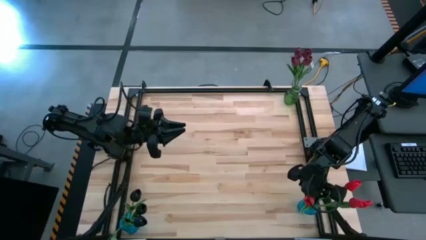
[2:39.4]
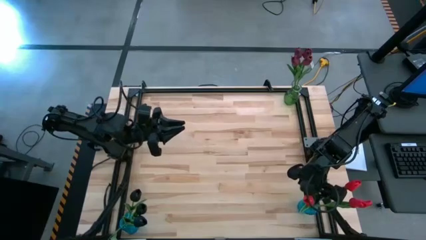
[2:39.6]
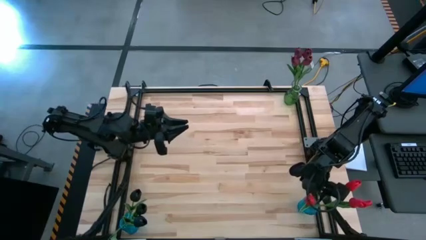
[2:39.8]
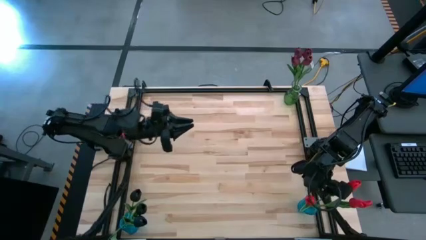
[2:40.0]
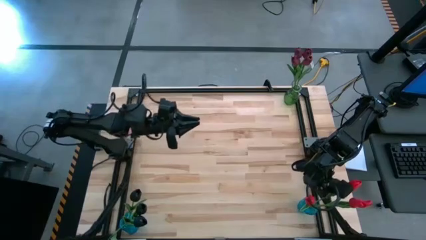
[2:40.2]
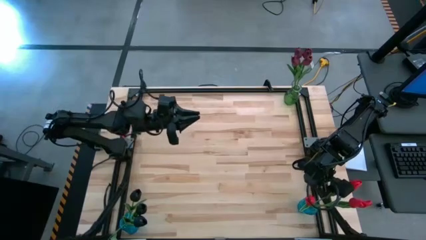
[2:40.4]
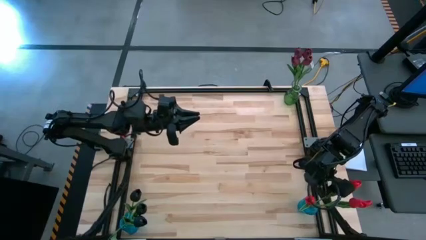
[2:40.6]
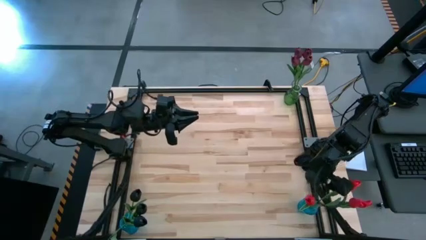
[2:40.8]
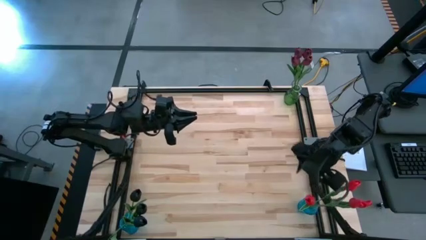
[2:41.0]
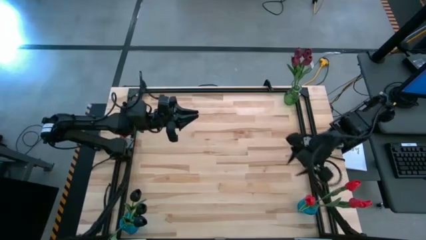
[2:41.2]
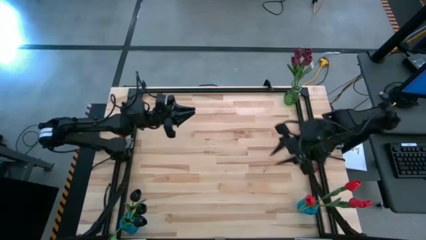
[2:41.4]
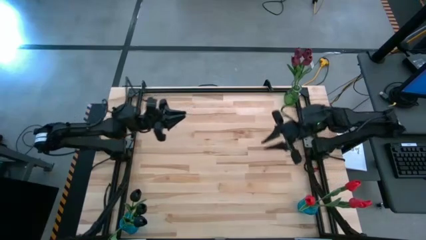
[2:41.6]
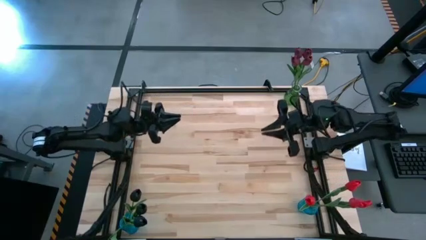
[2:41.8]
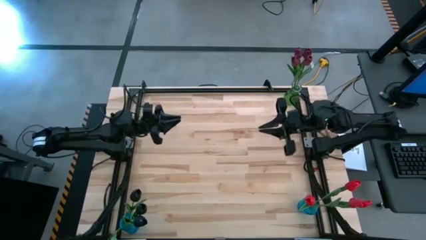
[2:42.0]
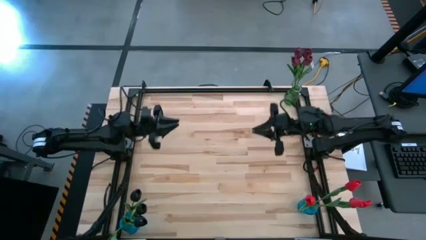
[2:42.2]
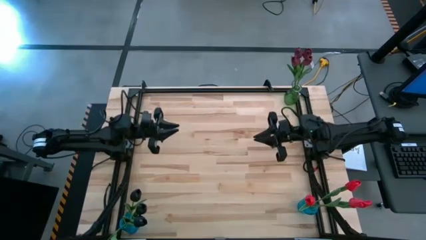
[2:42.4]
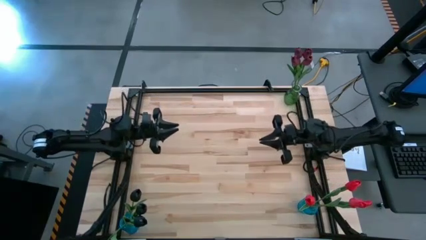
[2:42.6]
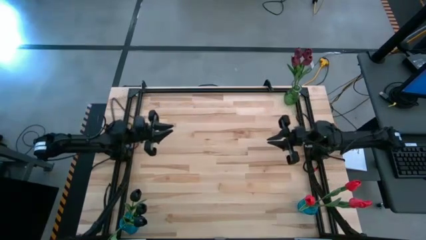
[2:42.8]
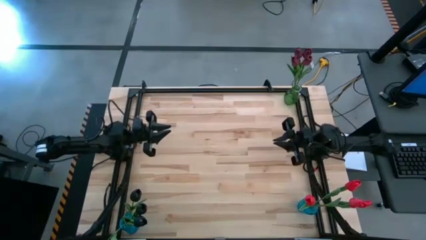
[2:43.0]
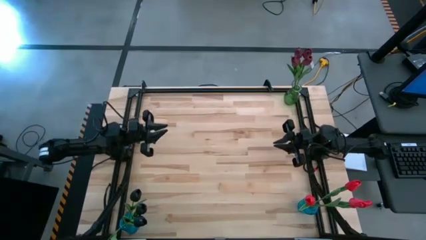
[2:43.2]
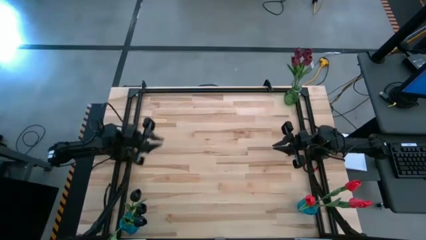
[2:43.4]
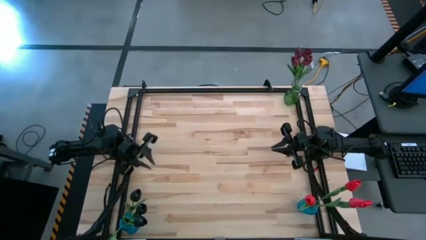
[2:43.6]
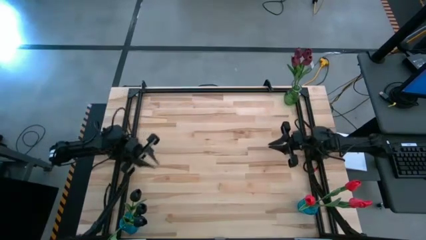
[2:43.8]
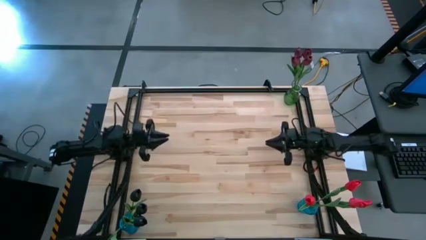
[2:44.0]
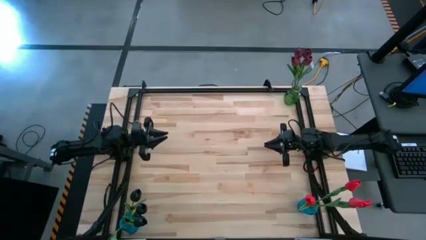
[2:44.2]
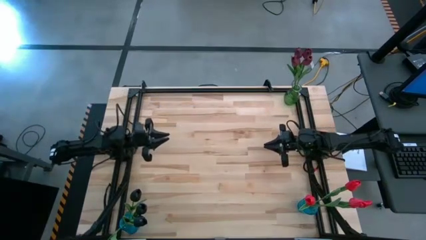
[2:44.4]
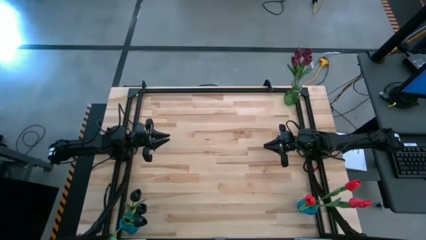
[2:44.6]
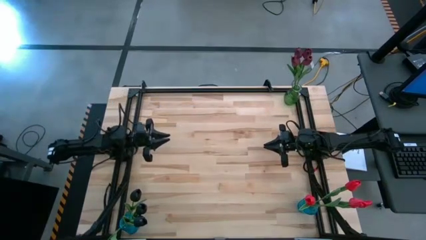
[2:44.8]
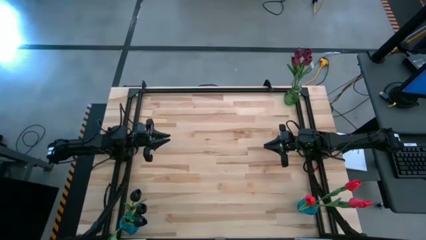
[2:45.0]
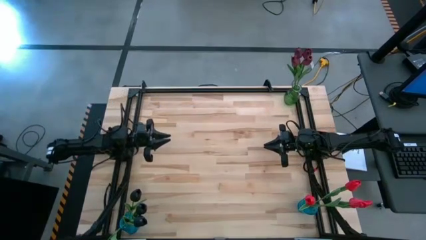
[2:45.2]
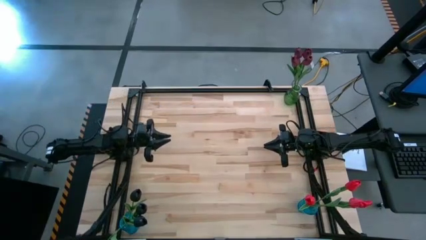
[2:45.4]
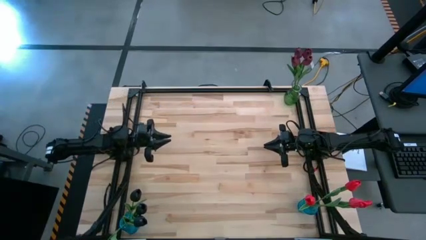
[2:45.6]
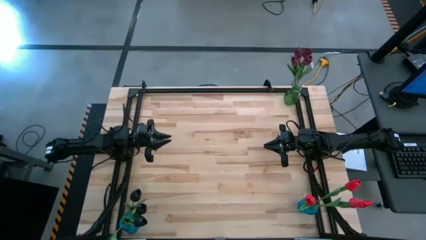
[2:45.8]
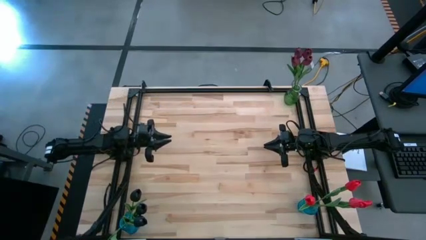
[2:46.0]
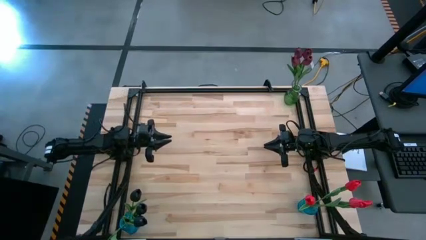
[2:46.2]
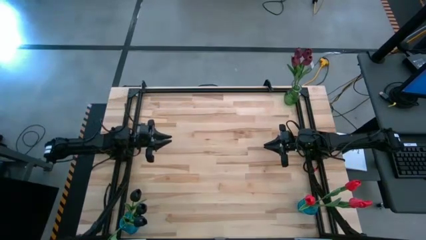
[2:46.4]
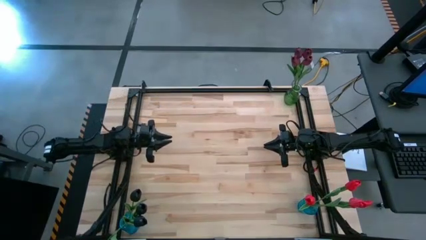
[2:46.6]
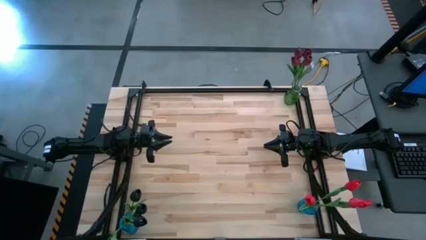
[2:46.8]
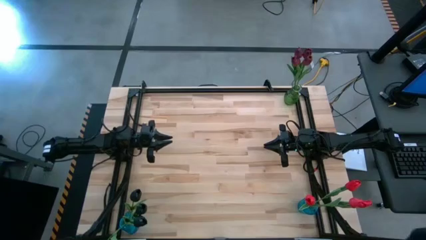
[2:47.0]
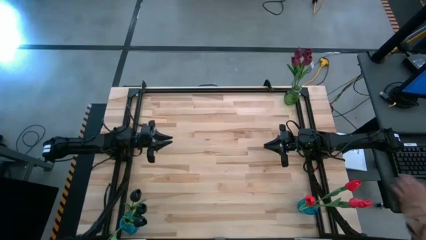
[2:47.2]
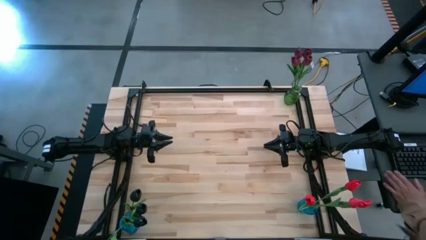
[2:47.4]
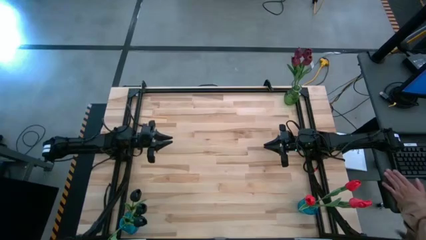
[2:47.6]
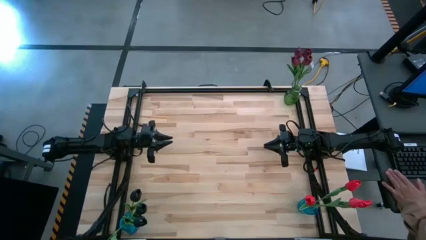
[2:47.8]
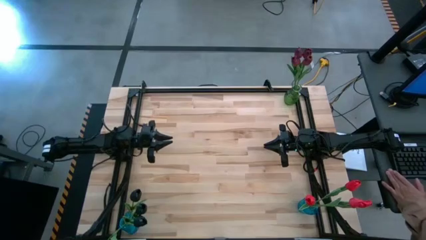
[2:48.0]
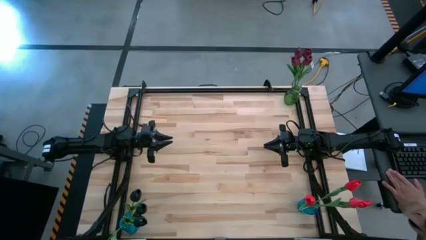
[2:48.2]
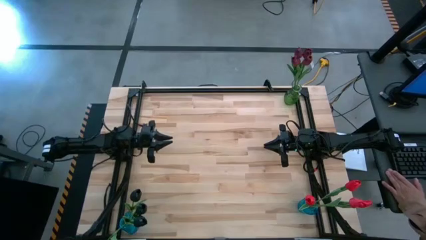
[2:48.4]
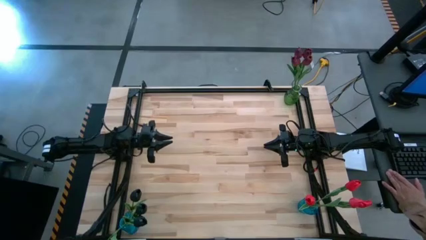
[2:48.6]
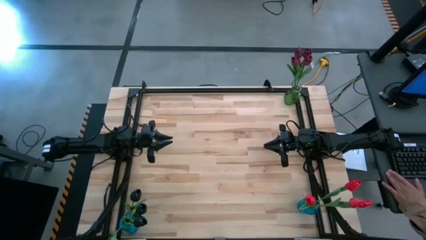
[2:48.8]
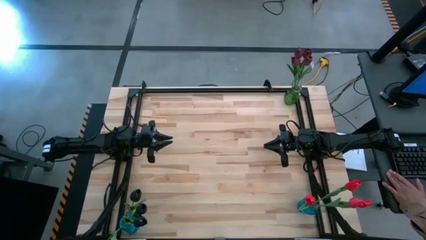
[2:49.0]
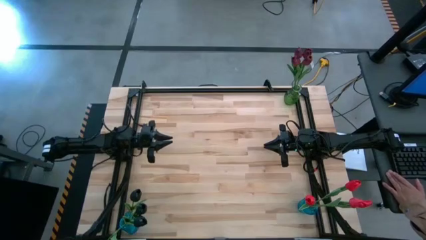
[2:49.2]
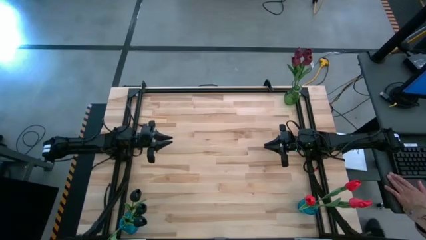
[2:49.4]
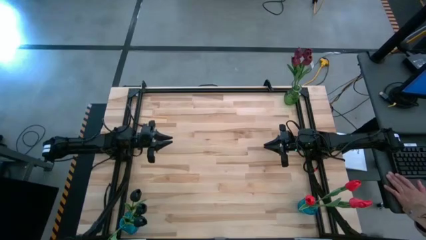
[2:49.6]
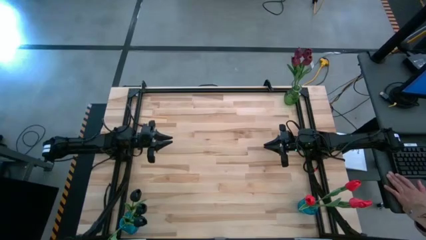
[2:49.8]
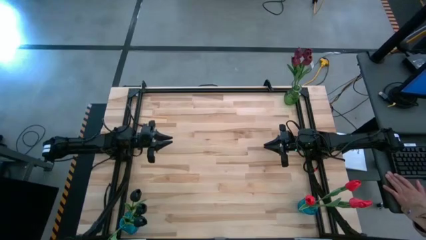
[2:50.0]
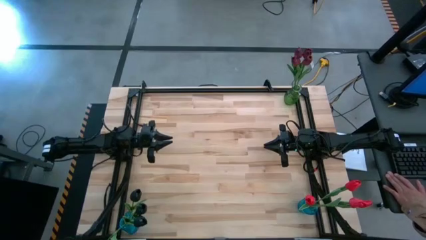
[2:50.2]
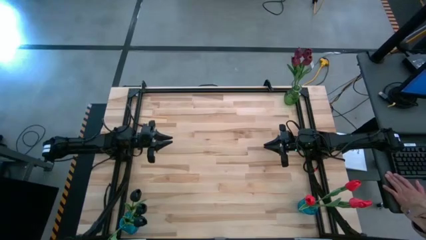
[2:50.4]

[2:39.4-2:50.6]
Task: Sort flowers into vase by color
Return to Home Position

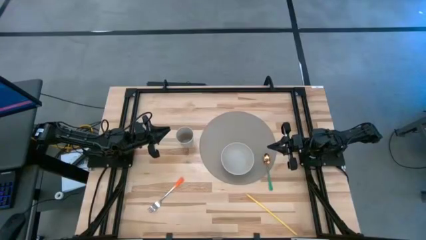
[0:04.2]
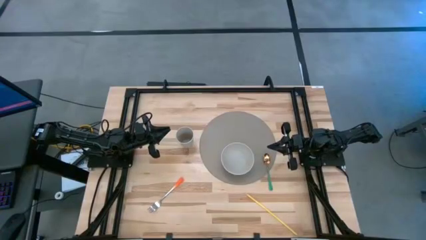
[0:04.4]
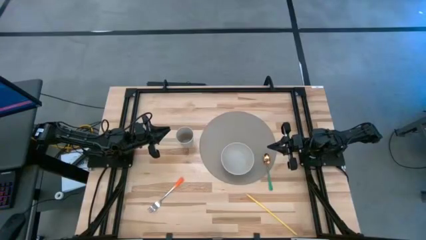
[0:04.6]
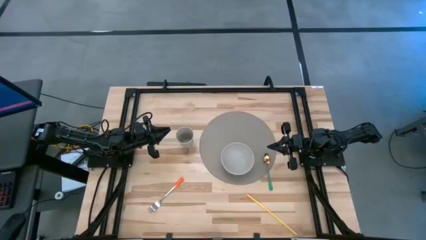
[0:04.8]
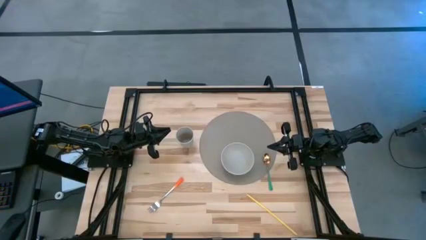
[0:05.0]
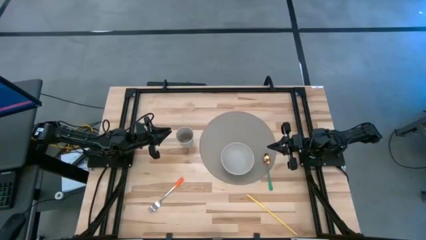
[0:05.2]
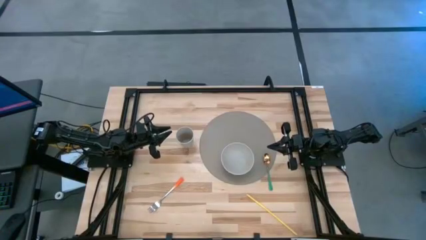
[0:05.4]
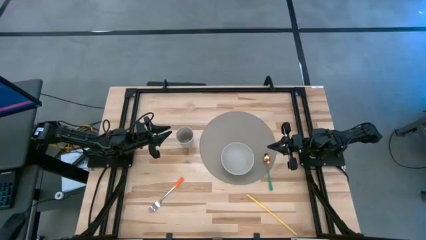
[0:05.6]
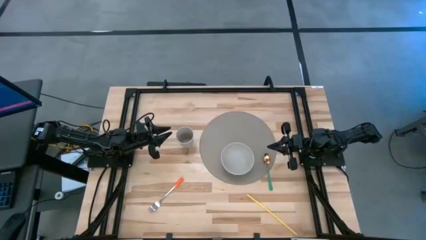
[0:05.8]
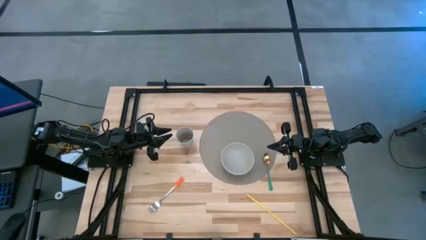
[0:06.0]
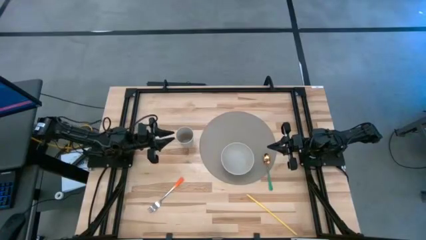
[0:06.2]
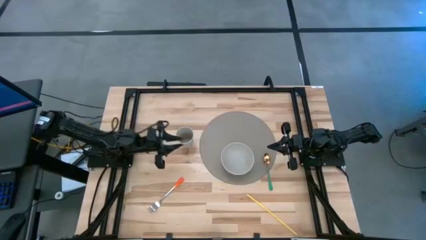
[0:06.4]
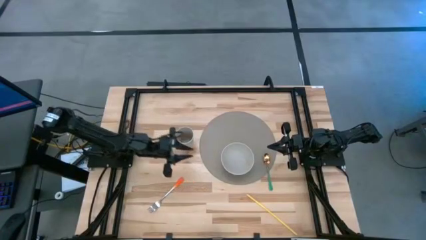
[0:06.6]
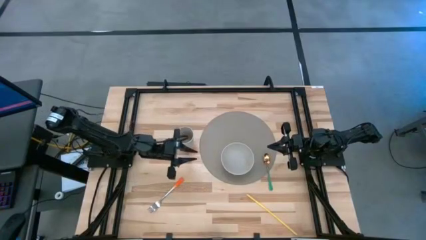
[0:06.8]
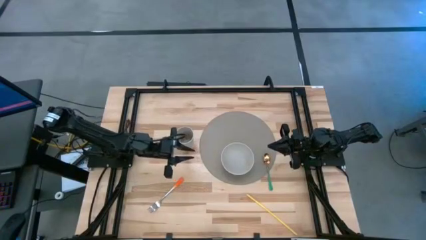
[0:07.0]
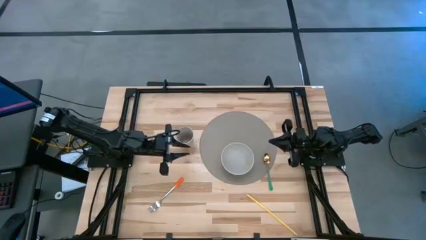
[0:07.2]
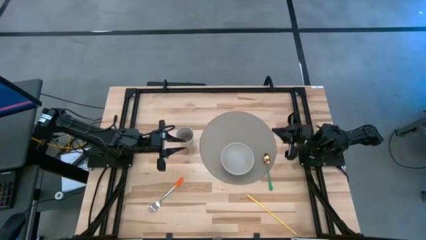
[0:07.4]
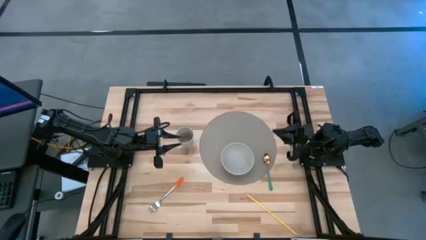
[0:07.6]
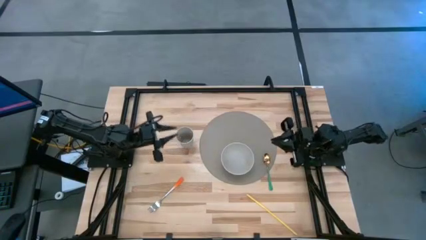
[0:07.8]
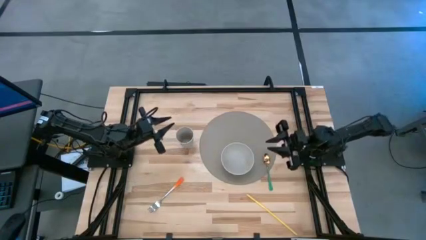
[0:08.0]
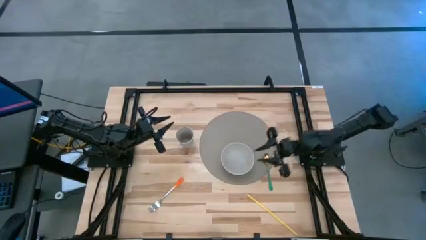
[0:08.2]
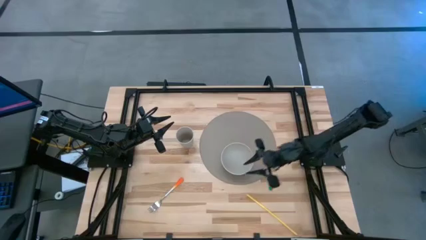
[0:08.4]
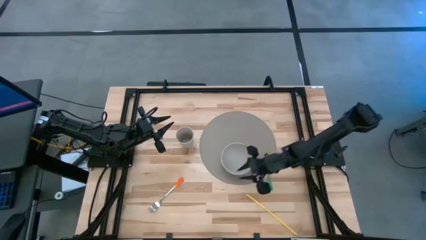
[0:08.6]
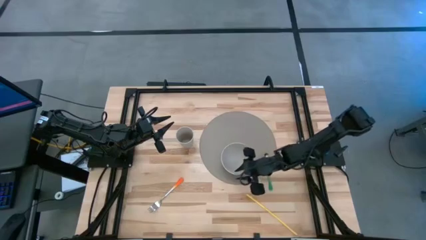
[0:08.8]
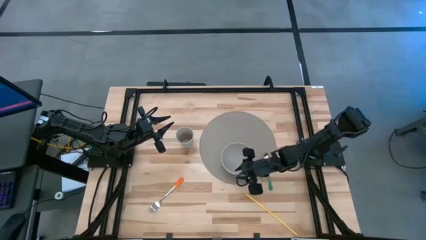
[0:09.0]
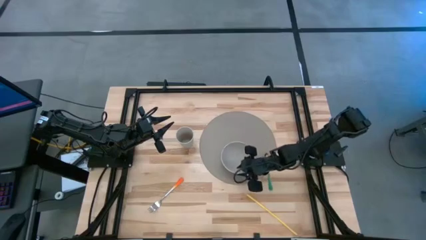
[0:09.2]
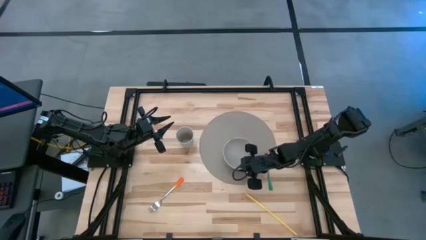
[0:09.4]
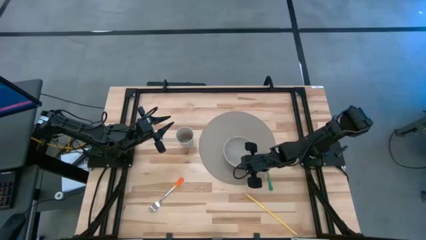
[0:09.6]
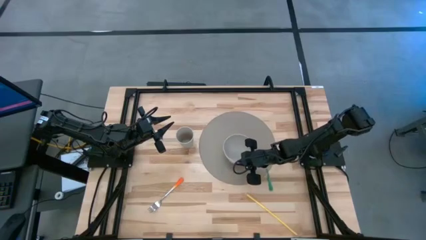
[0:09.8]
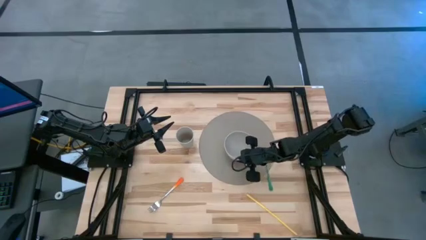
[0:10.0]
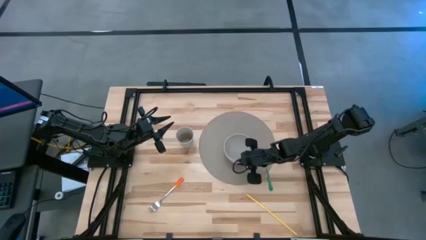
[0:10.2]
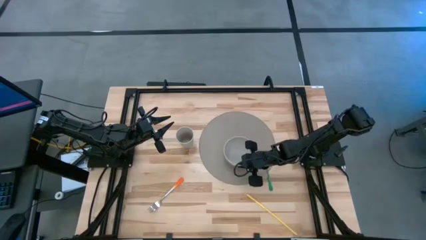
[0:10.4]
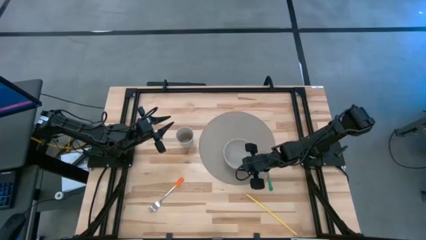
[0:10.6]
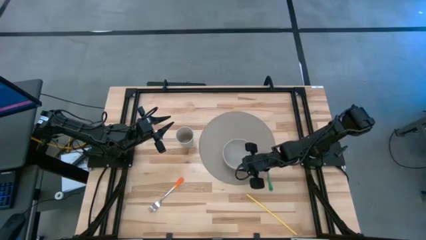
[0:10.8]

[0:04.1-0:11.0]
Task: Pick & Place Utensil
Adjust the gray bowl
